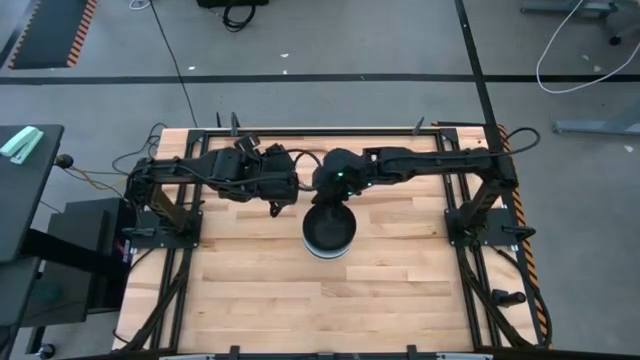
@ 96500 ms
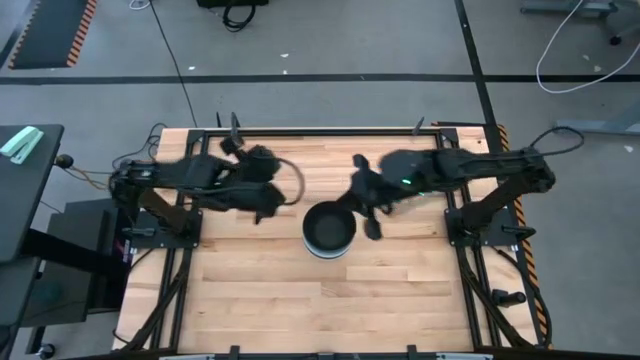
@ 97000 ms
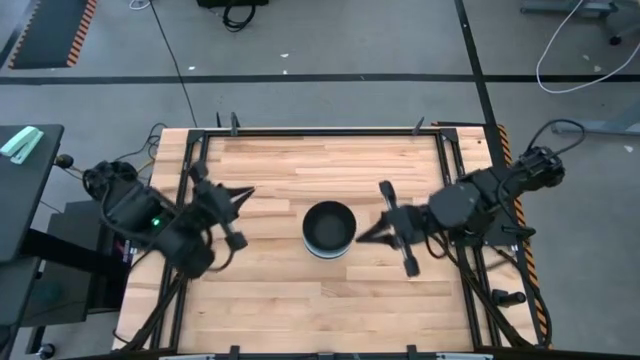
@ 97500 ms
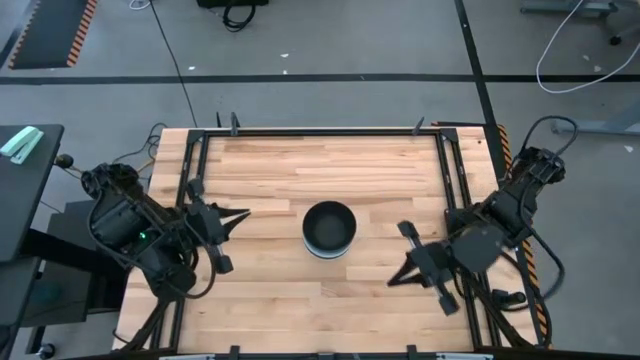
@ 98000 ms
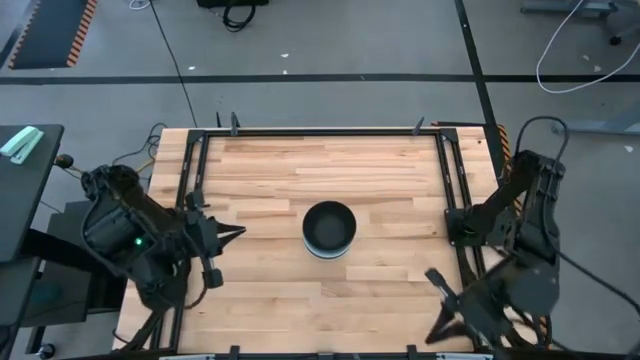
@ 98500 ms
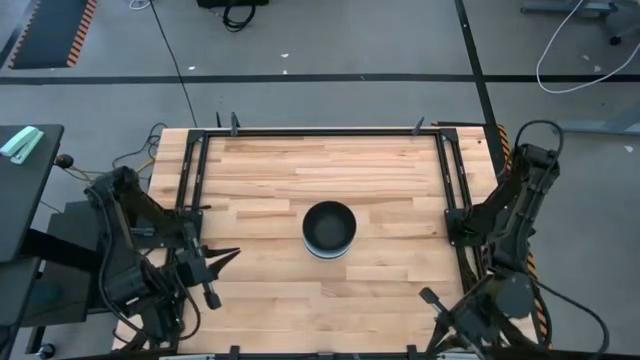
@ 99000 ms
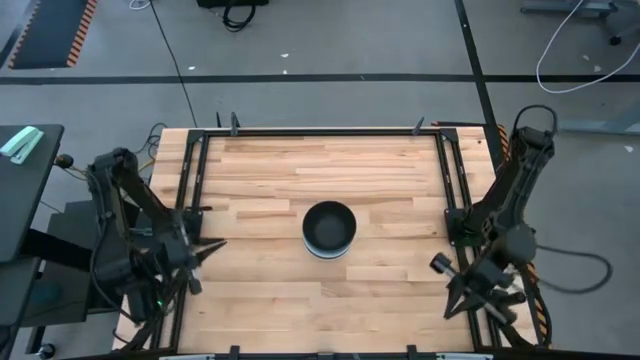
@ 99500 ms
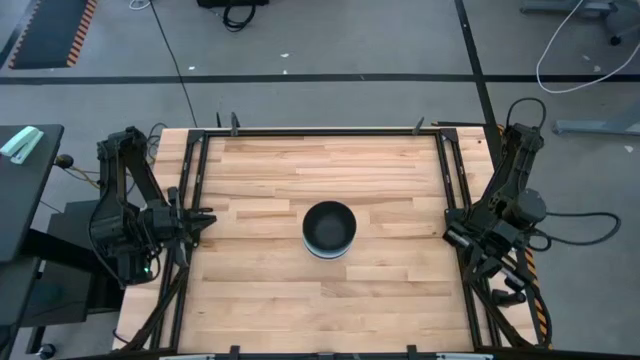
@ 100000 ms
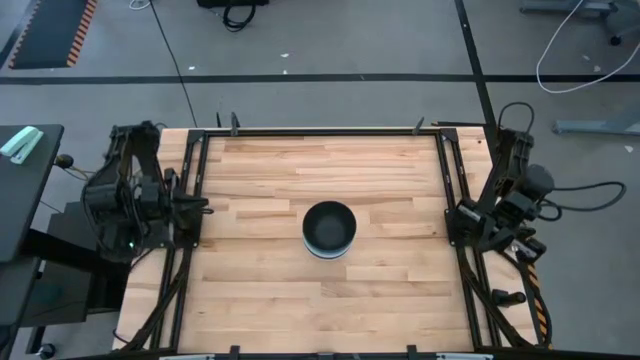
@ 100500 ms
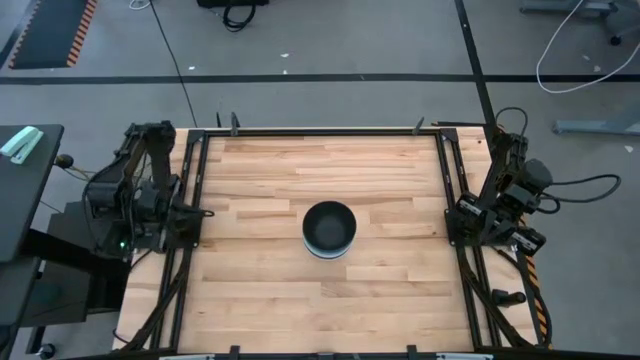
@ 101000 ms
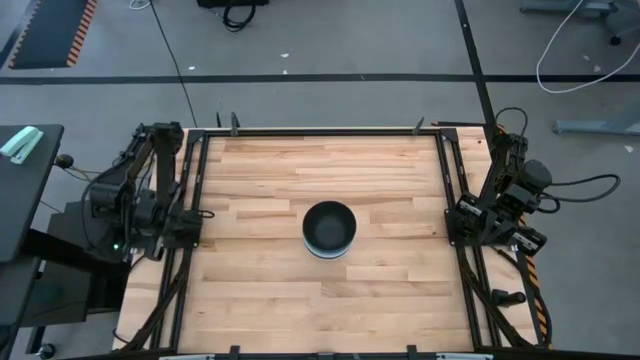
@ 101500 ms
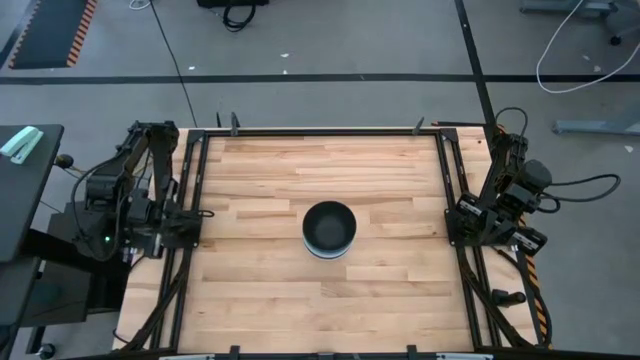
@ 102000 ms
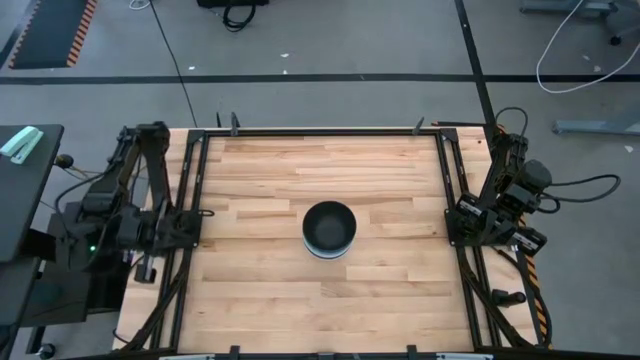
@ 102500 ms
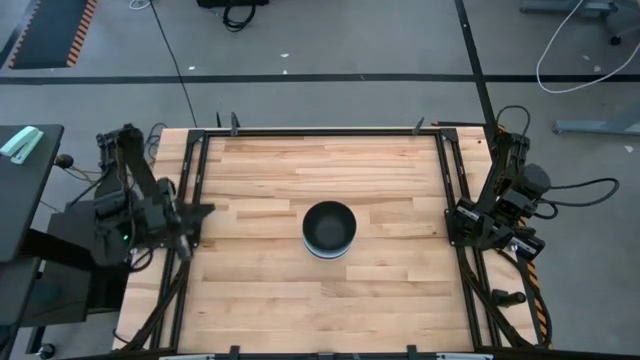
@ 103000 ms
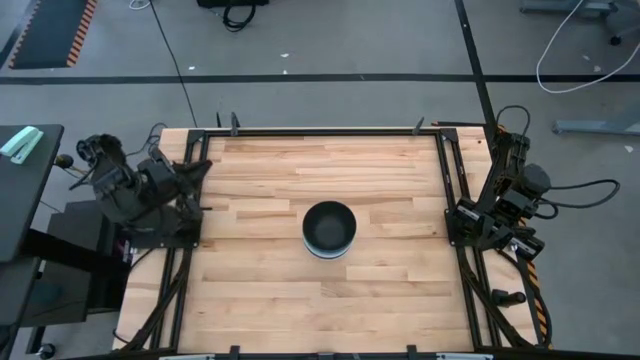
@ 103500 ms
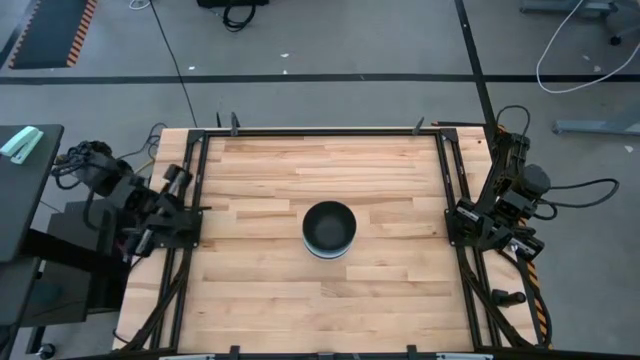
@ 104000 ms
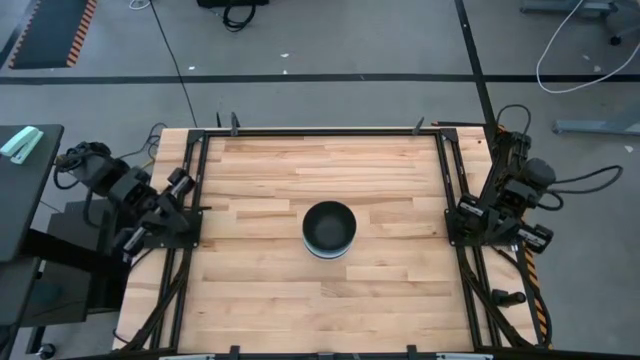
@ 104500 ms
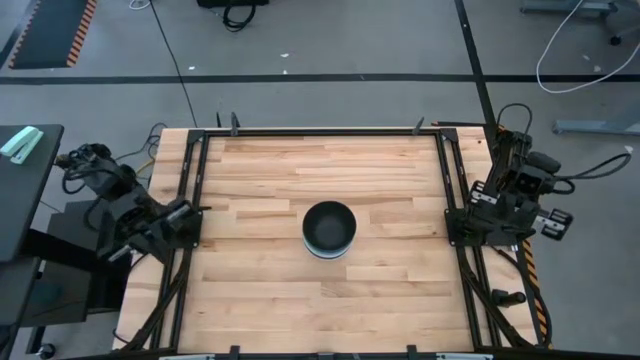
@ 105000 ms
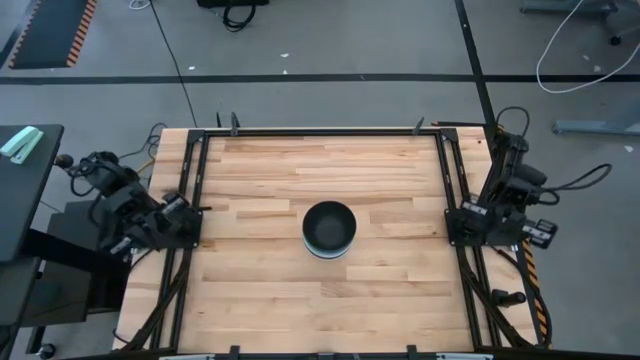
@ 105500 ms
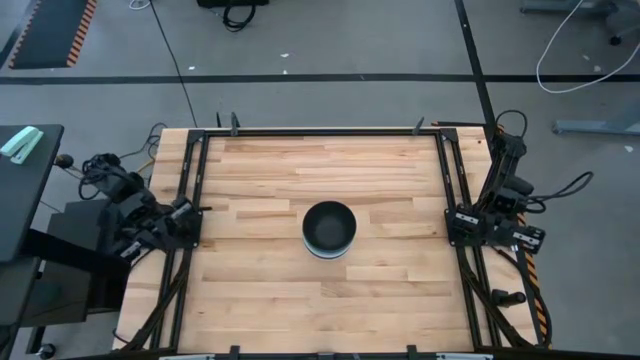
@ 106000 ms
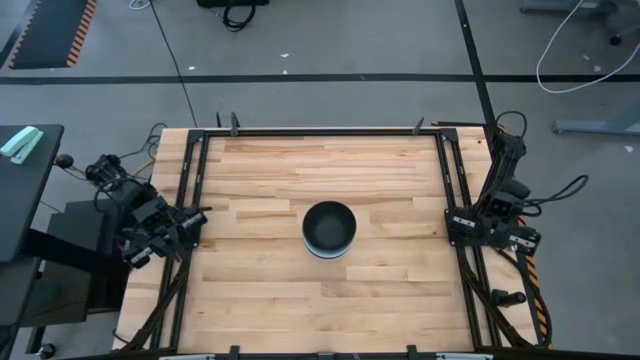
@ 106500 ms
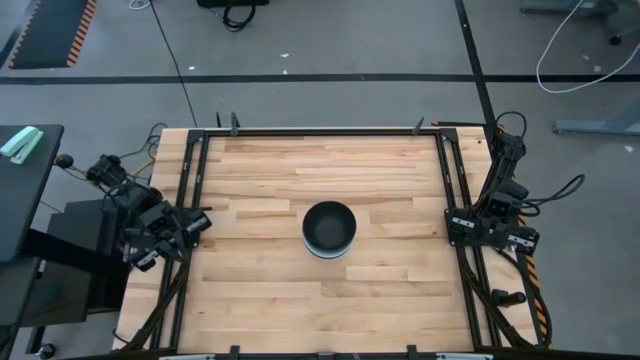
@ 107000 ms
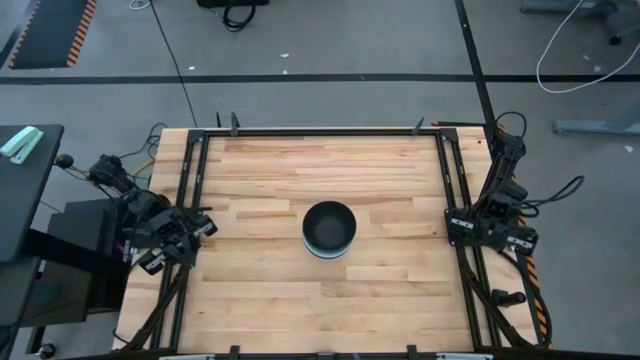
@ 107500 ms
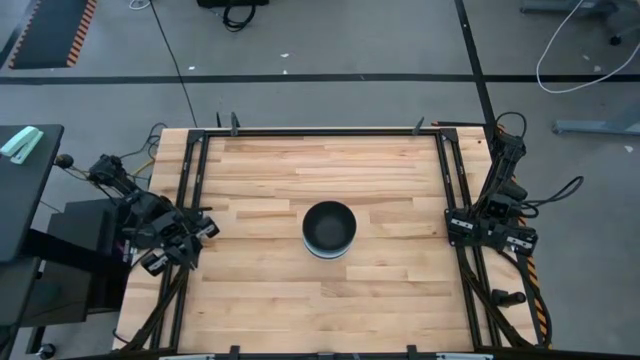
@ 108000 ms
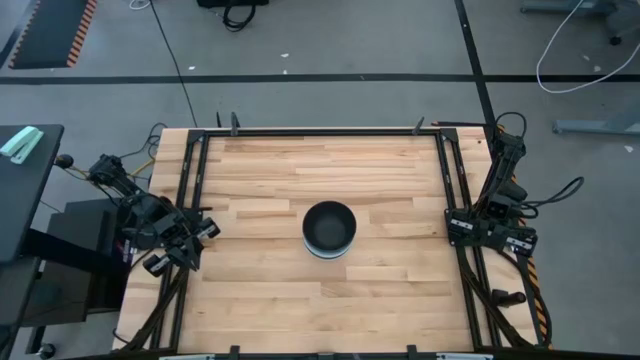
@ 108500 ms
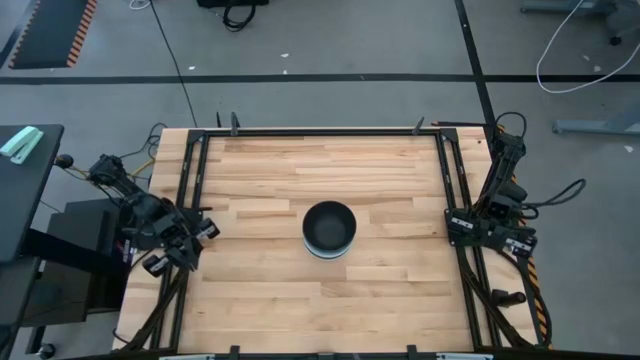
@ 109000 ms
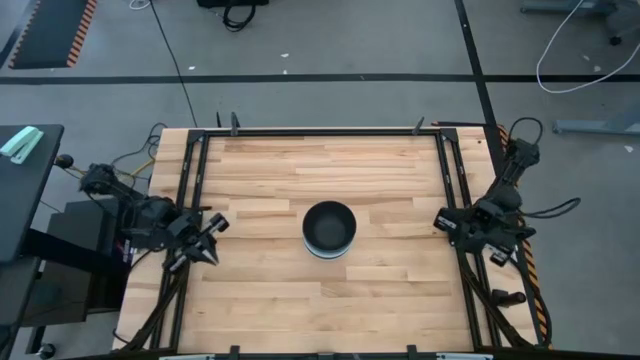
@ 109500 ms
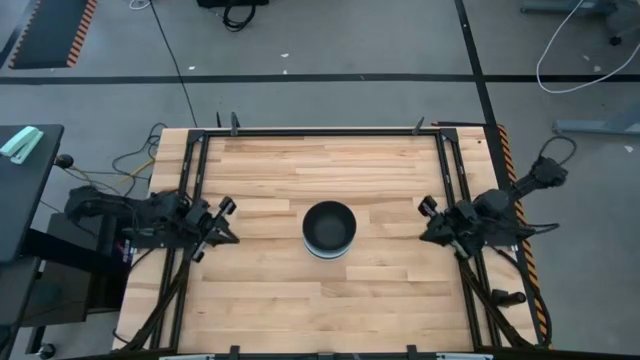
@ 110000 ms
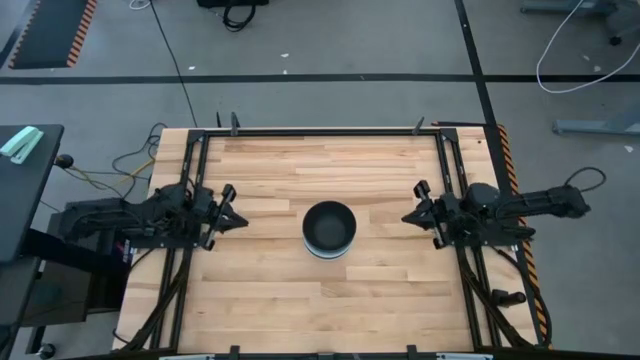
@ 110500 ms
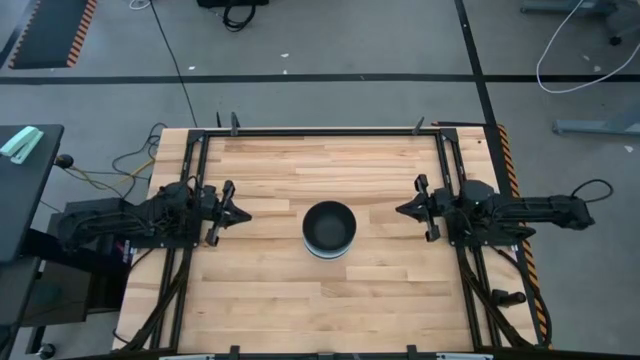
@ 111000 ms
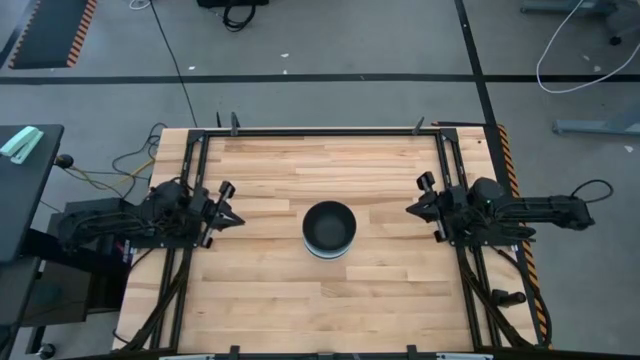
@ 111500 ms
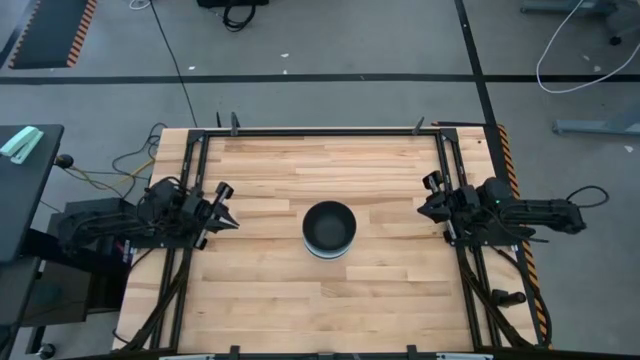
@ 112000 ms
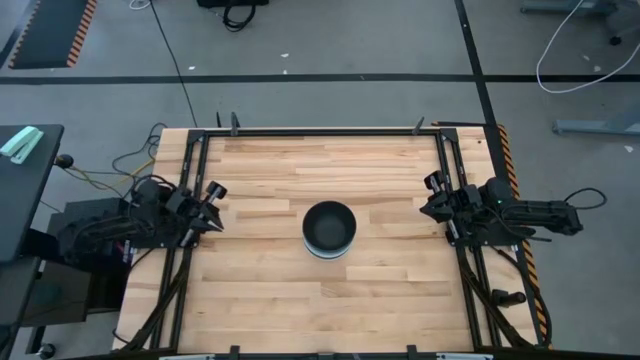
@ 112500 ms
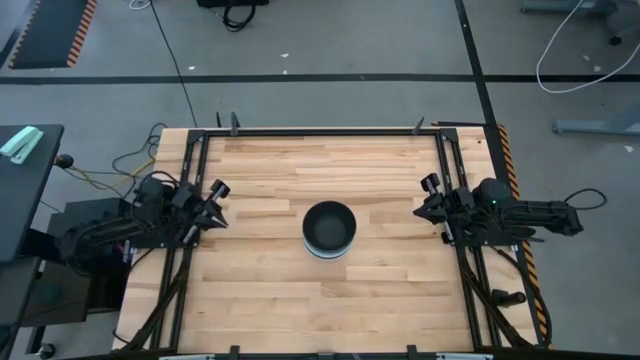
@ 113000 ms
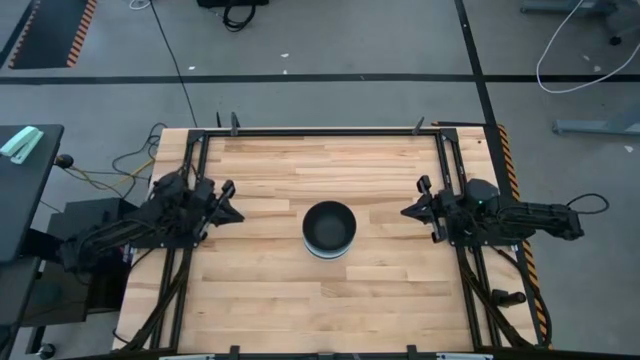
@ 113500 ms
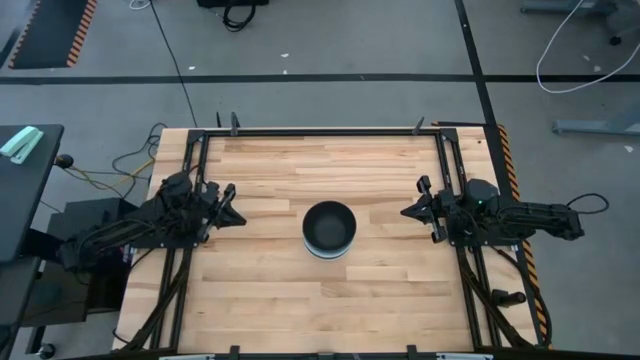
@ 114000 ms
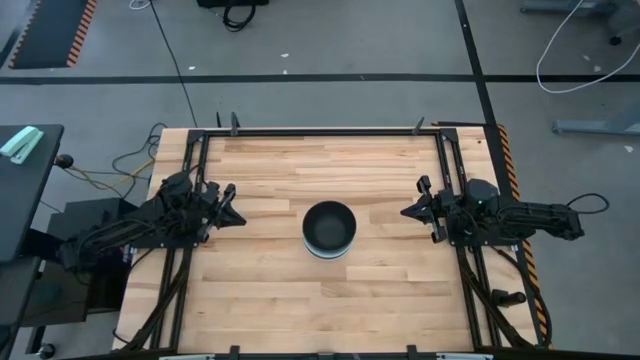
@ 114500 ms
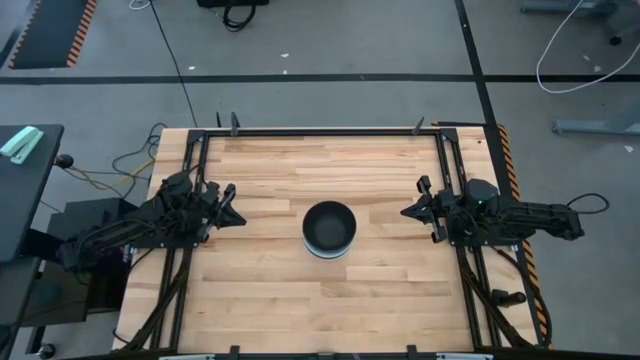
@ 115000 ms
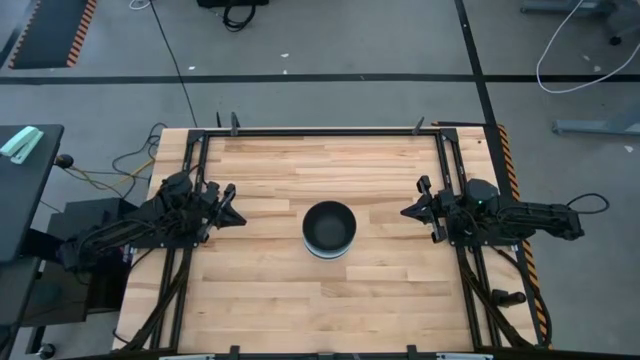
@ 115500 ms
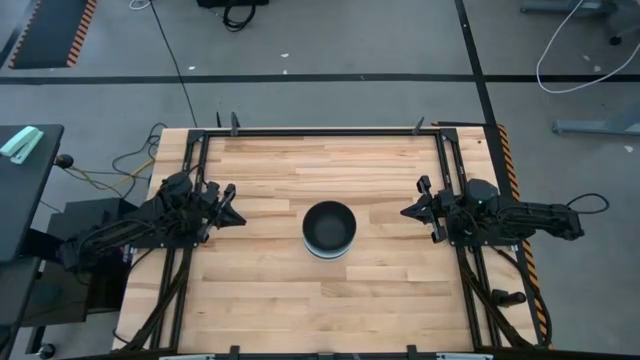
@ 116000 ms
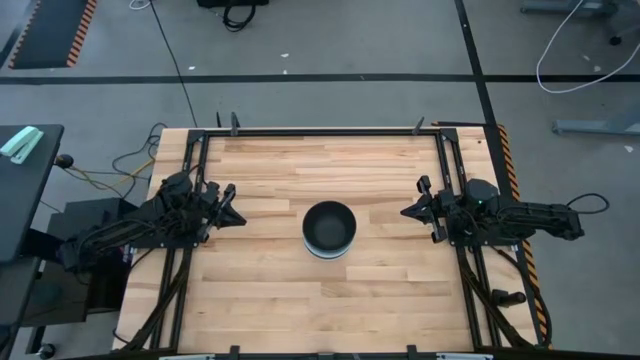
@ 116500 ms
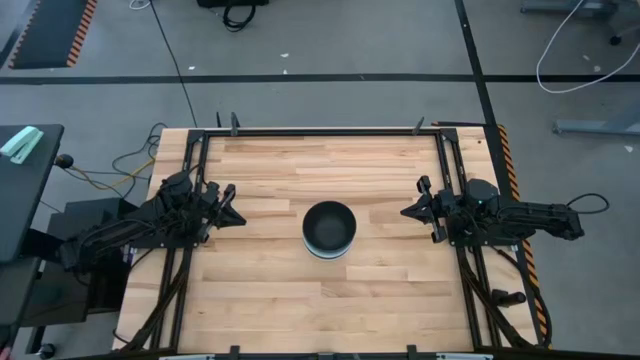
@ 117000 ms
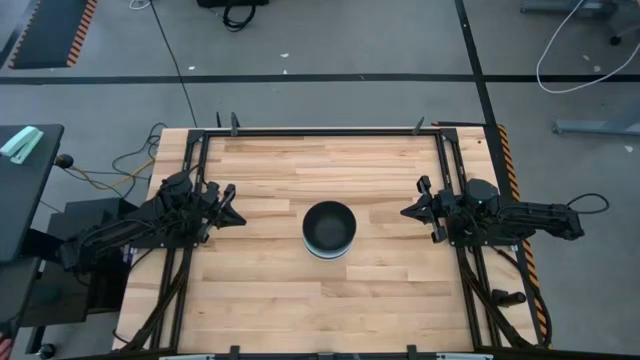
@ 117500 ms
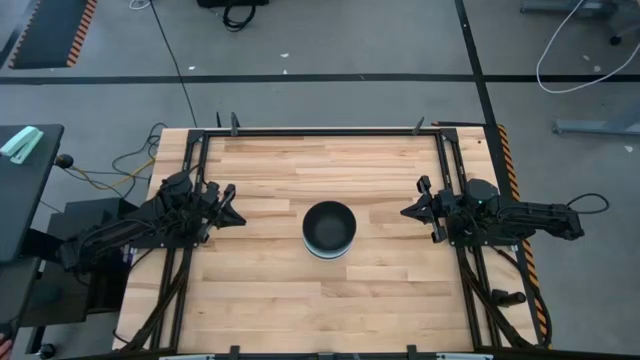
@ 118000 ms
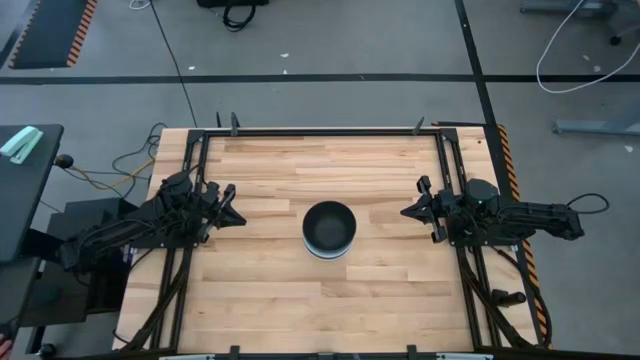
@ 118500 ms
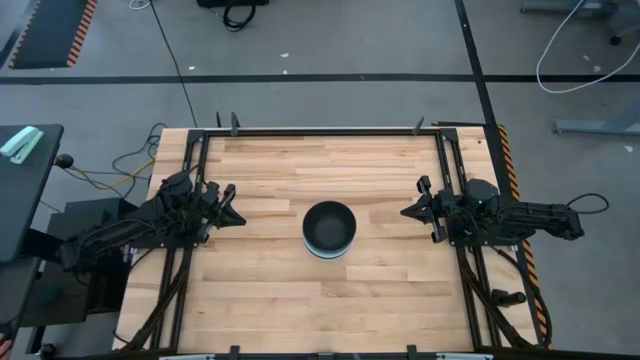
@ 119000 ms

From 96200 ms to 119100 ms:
Task: Nest bowls inside each other
Return to Home Position
